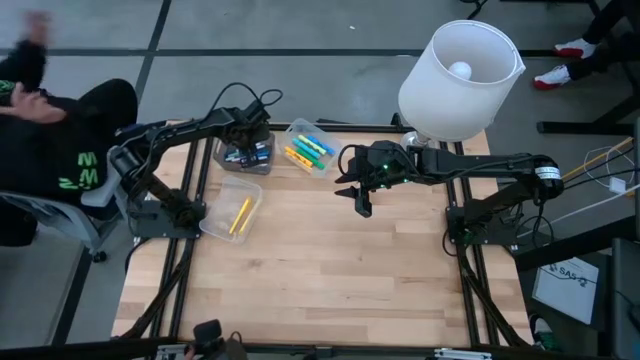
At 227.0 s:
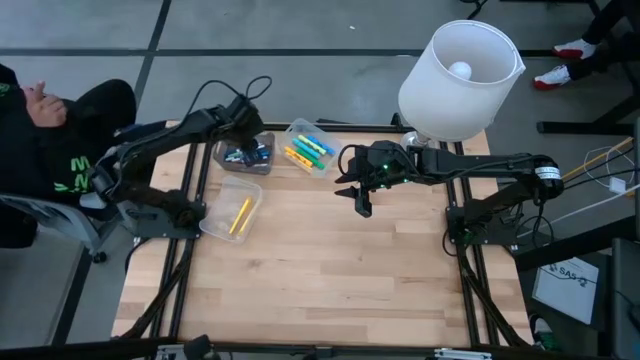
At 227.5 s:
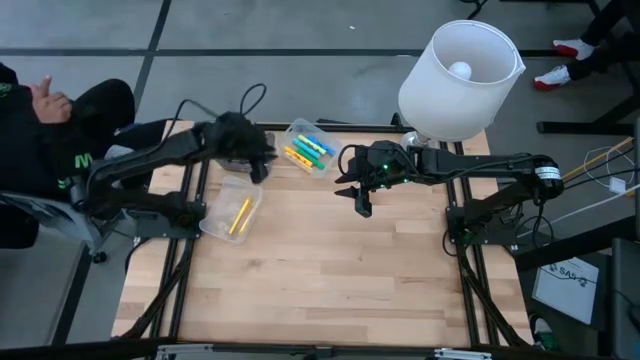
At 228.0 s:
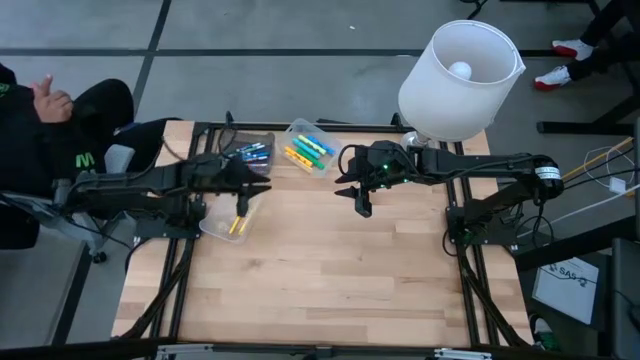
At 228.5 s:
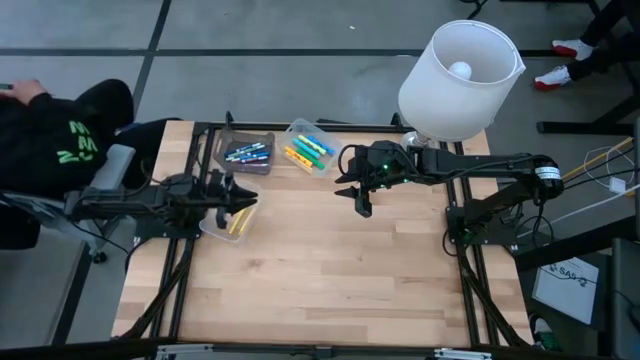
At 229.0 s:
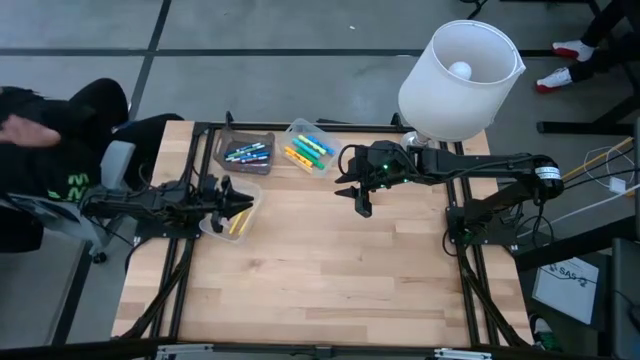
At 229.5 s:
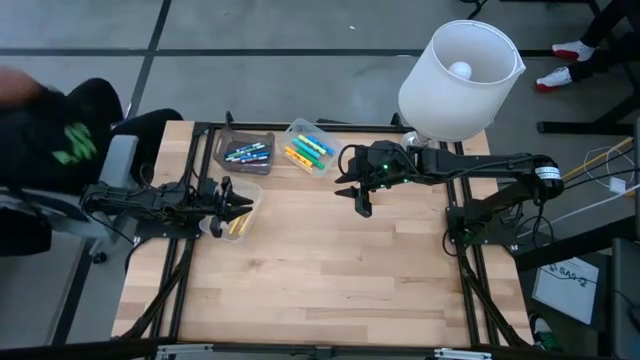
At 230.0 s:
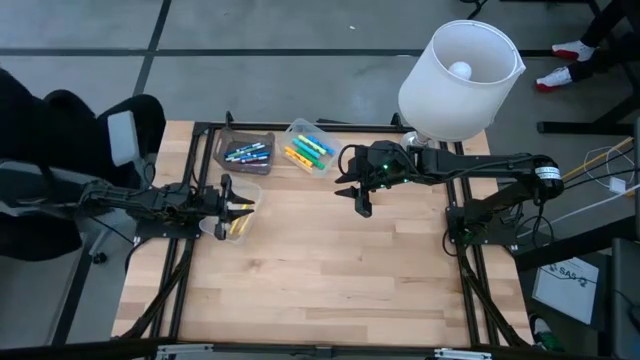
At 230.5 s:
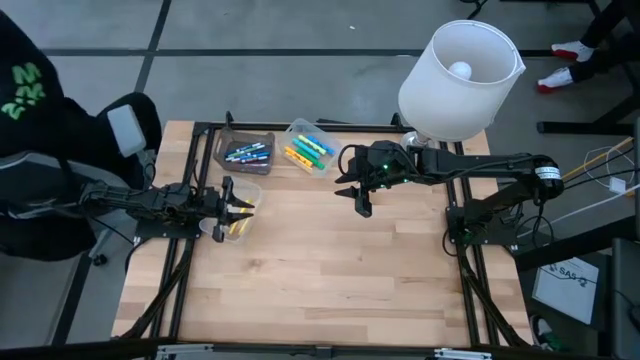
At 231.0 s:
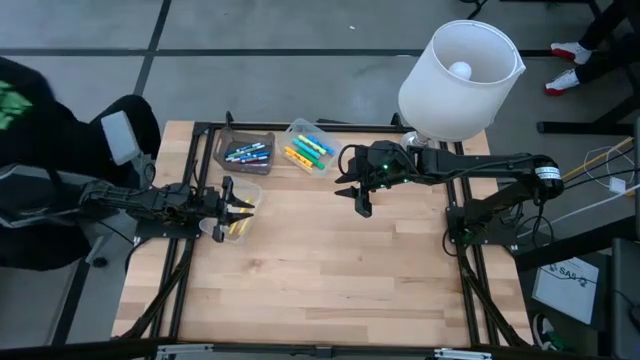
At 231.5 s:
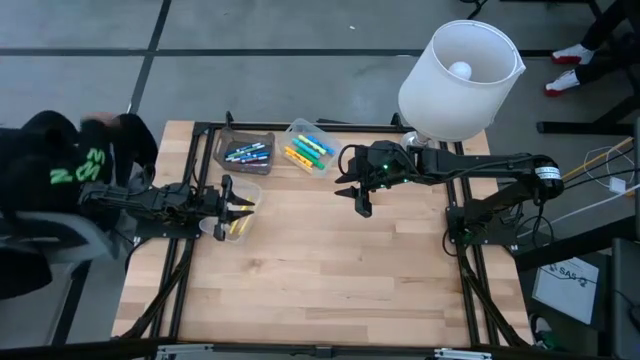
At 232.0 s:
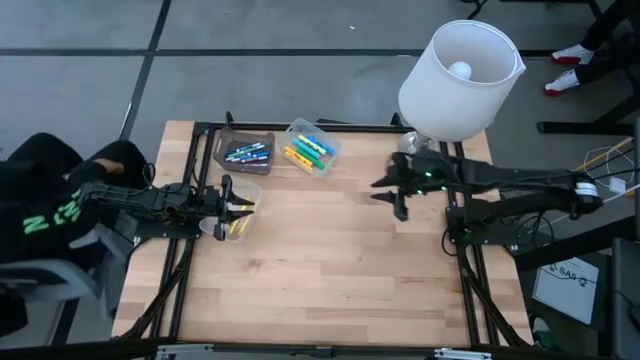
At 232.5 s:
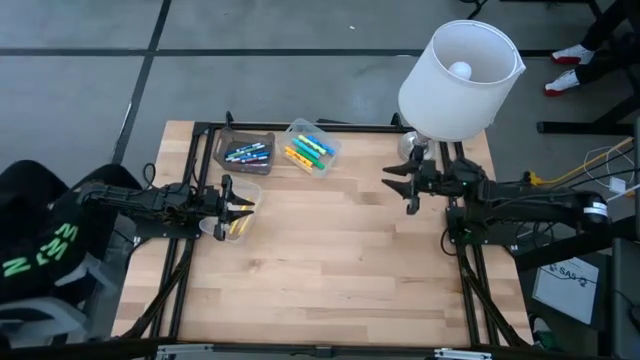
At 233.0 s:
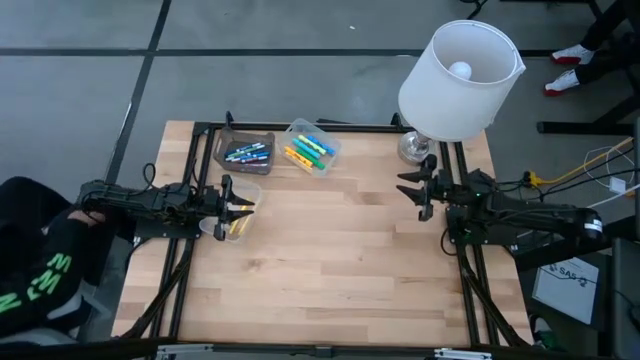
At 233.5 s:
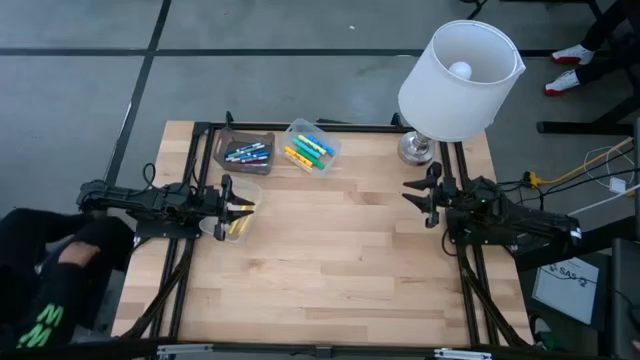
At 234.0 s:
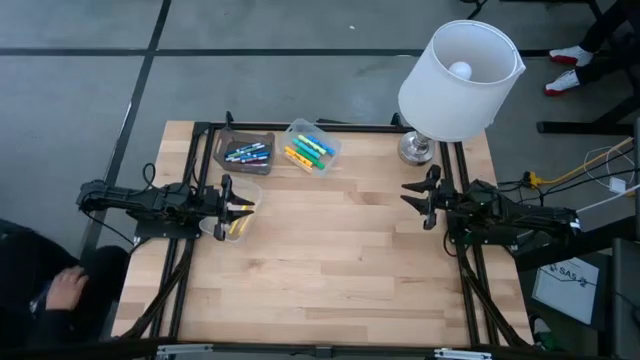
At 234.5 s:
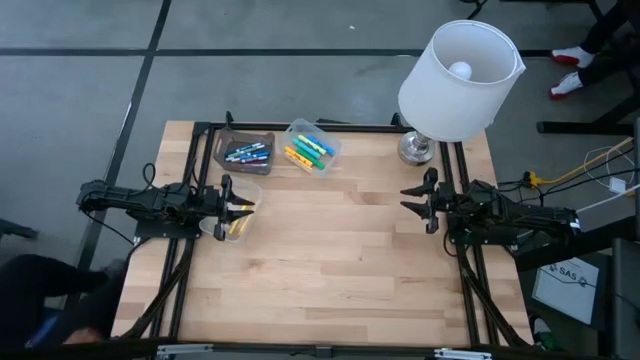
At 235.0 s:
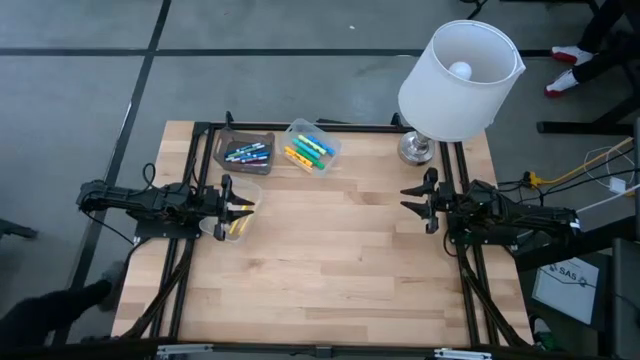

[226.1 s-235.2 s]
Task: Pick & Place Markers
Return to Home Position

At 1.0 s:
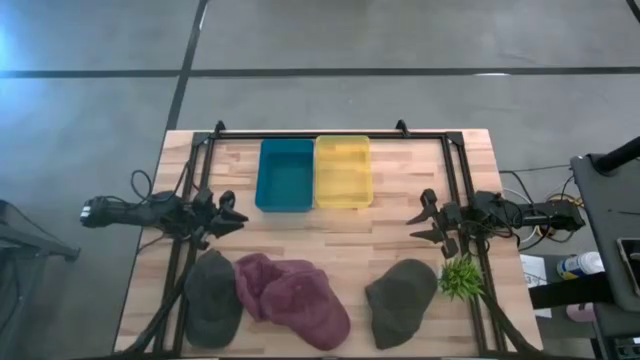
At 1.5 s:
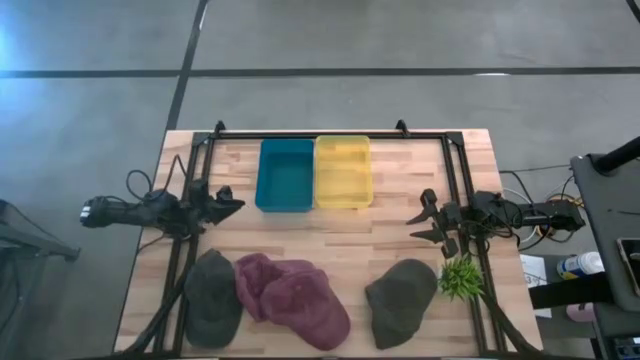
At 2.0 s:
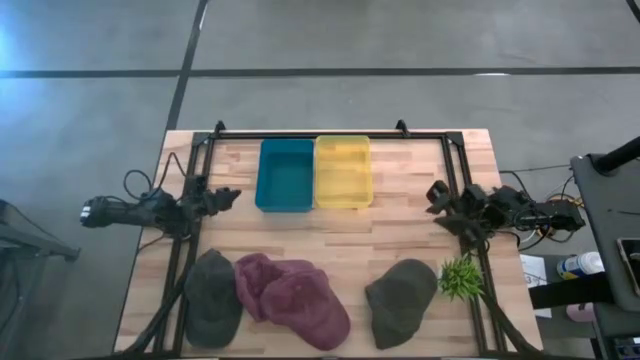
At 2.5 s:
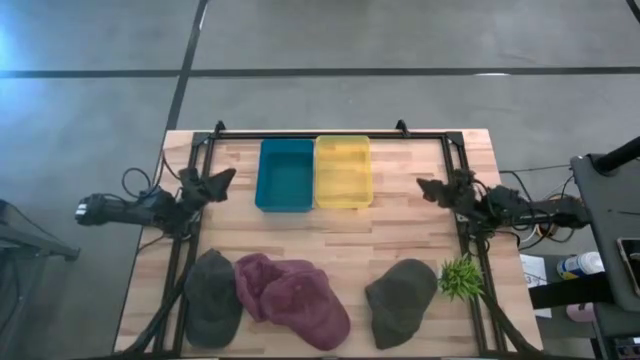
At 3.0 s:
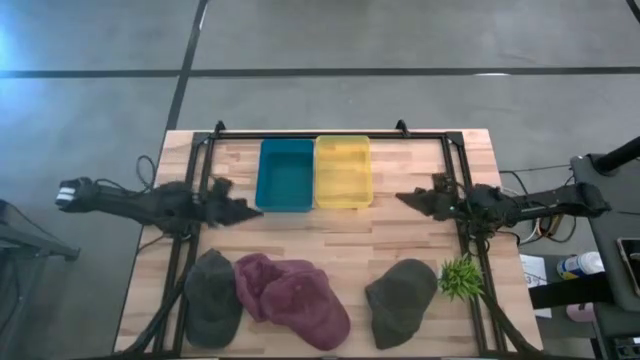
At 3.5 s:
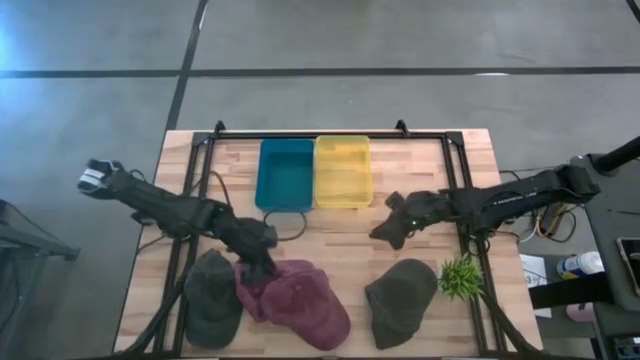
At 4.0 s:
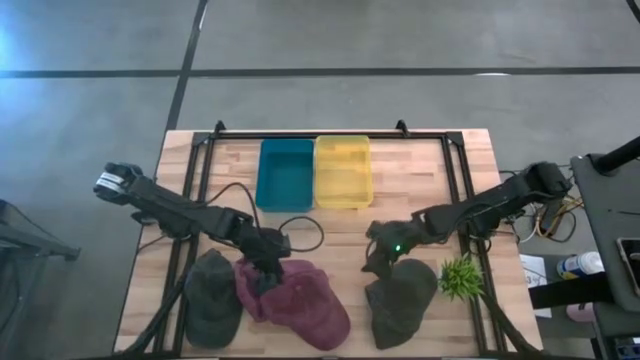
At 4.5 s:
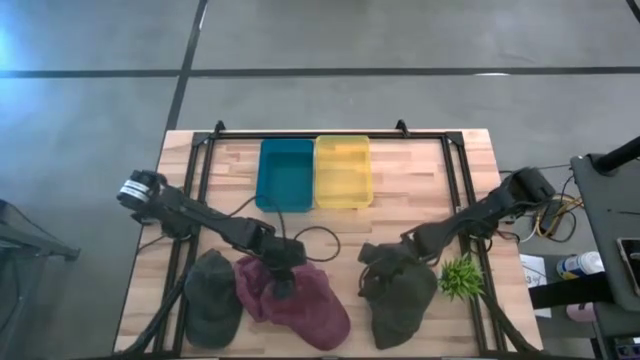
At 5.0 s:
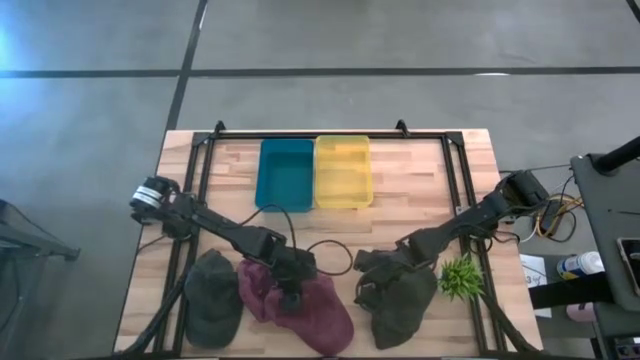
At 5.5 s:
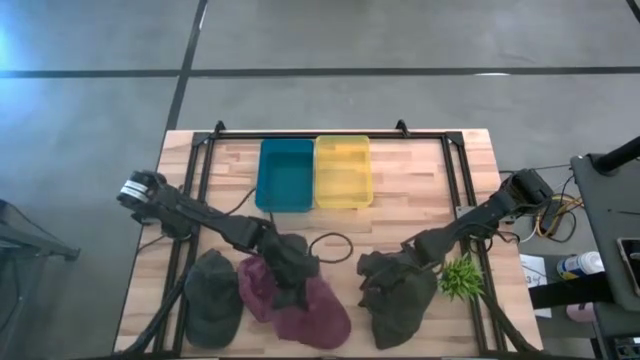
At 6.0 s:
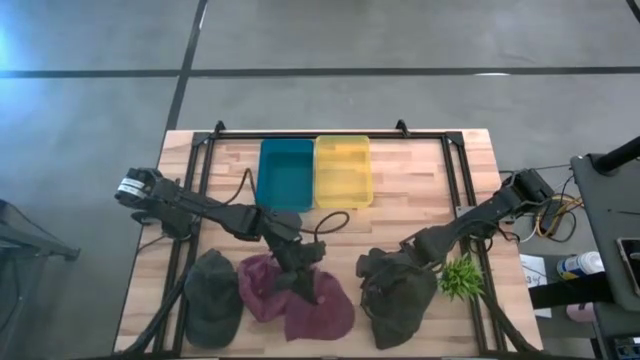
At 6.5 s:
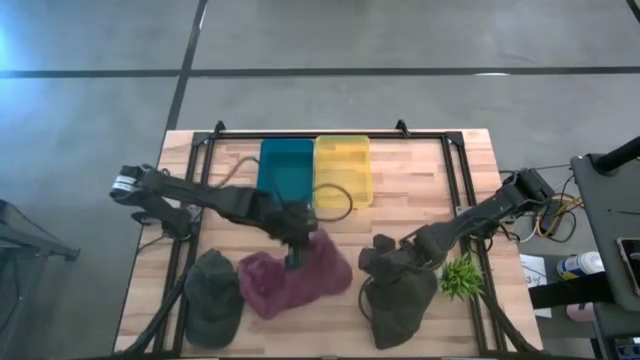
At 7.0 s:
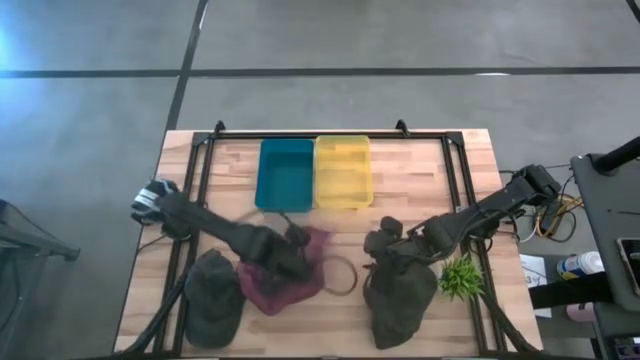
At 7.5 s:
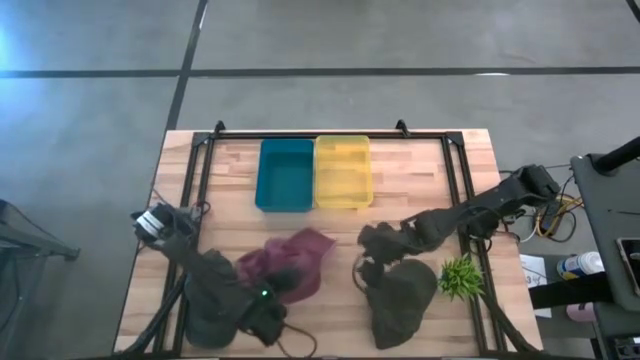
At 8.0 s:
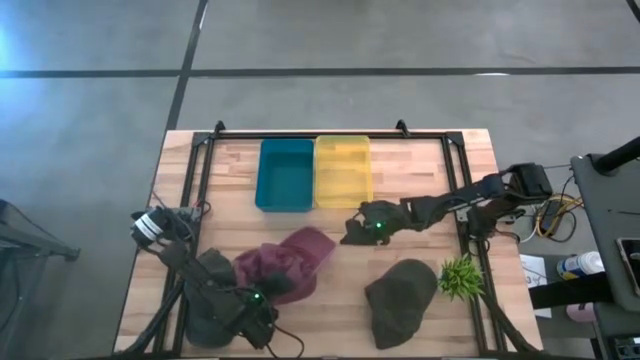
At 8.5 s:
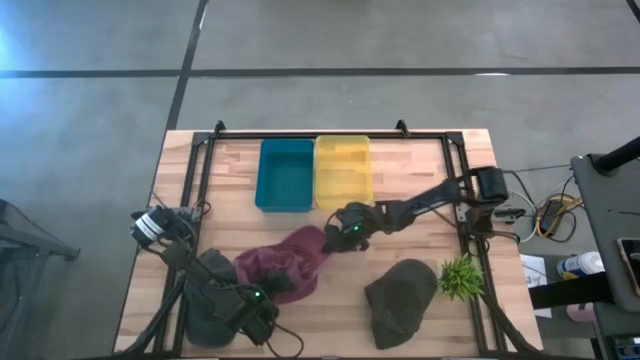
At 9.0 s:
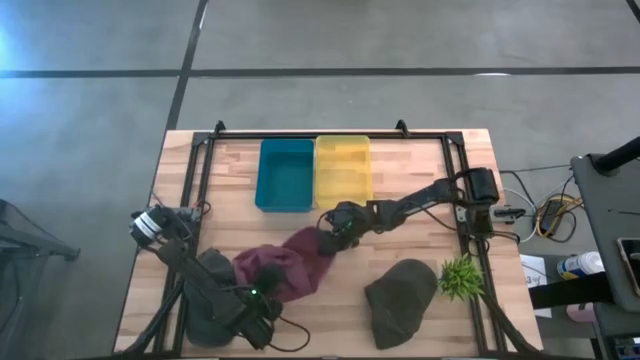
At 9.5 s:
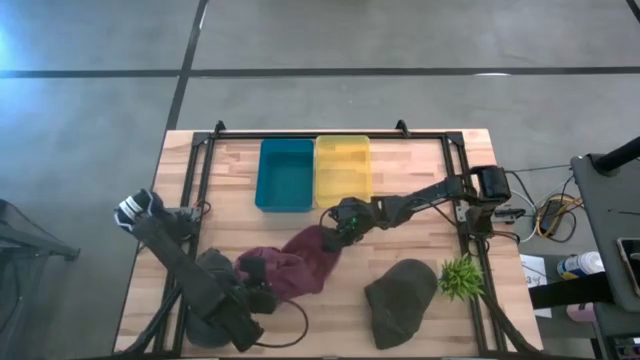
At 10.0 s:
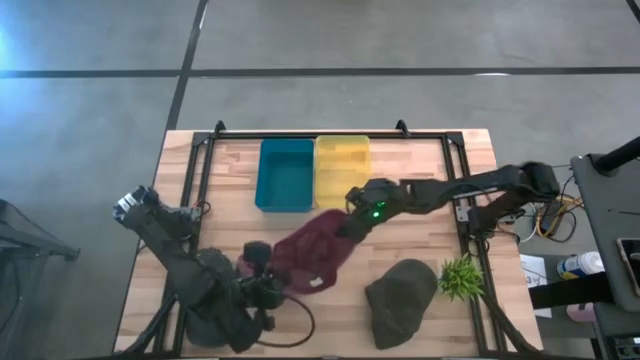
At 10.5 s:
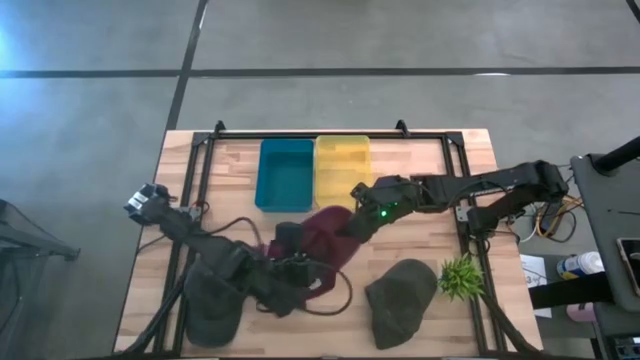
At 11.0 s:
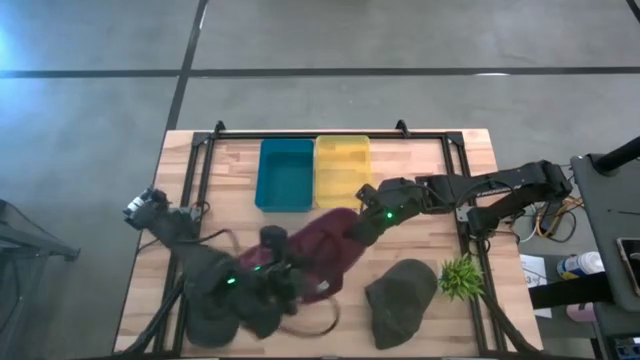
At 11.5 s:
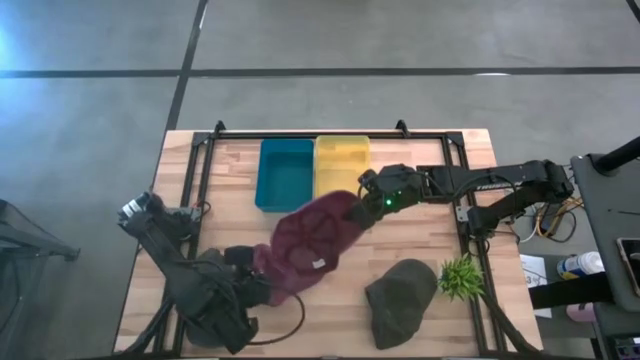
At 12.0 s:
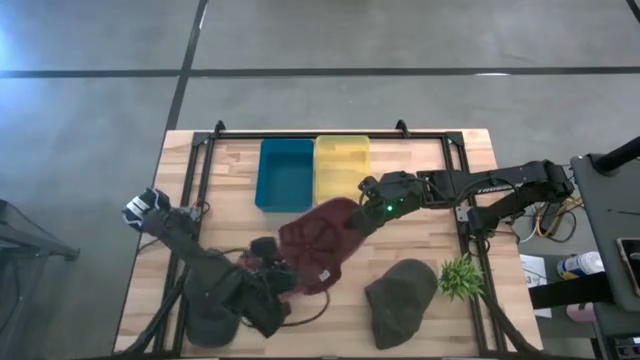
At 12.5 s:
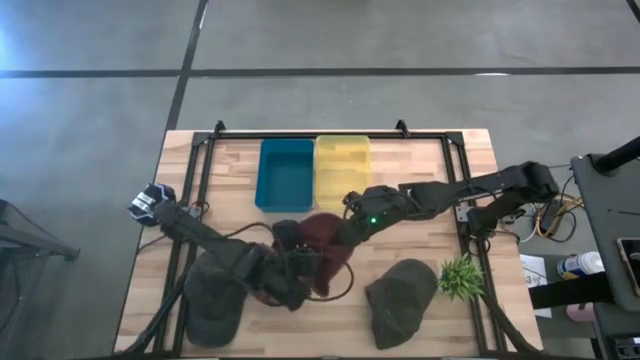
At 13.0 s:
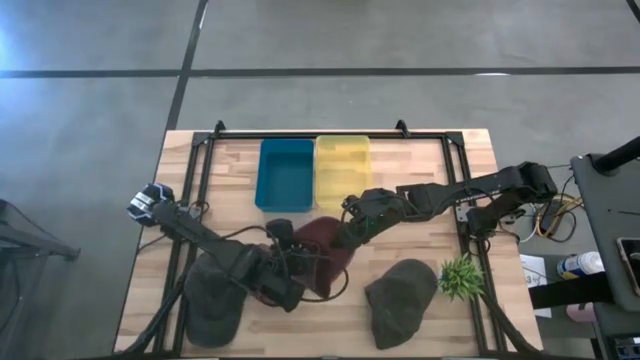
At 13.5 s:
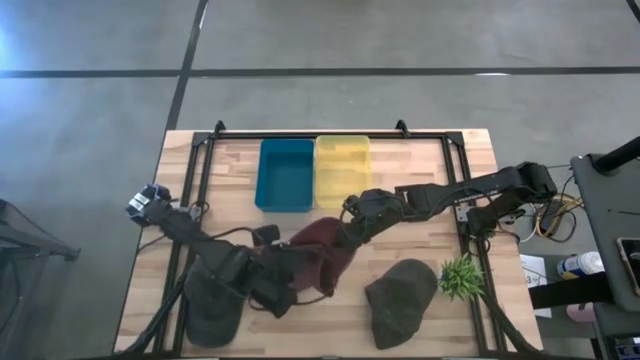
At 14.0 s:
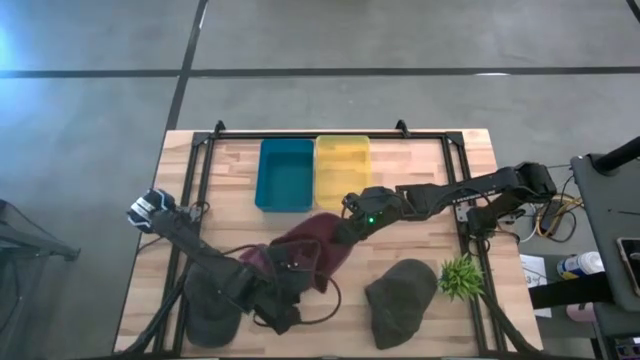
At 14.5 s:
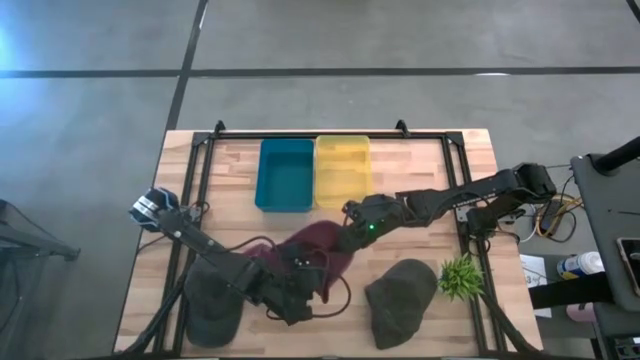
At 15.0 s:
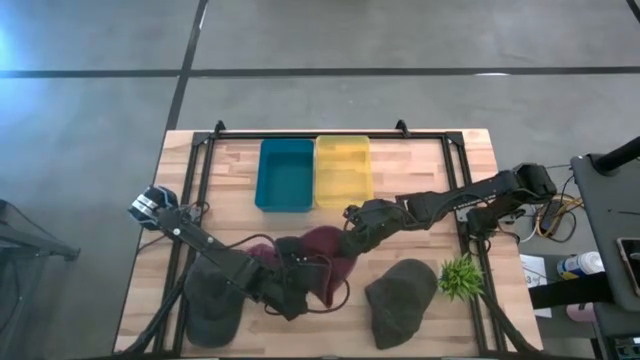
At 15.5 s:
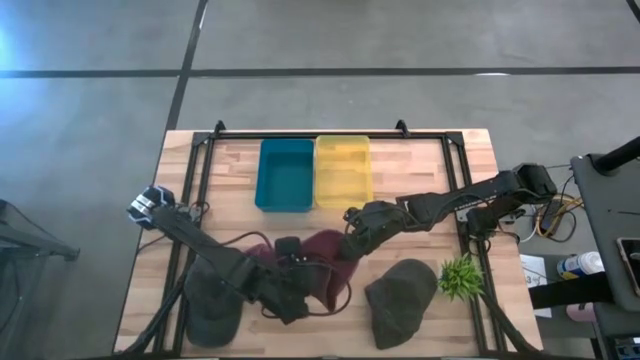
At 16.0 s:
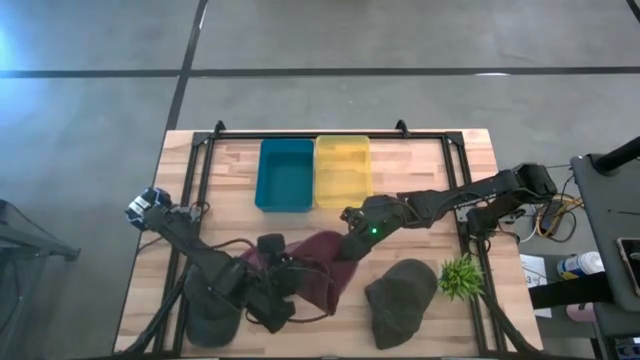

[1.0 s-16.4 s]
Task: Pick & Place hat
Put the top pink cap into the blue bin
